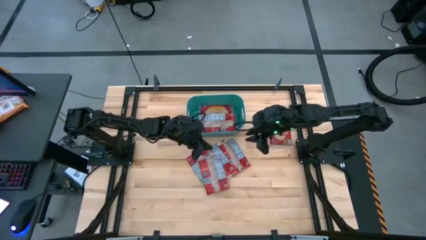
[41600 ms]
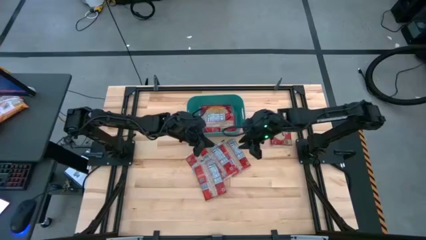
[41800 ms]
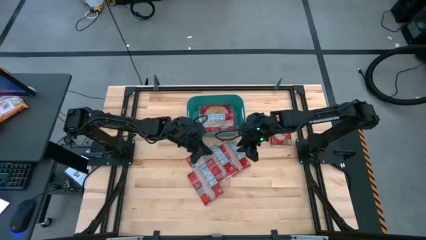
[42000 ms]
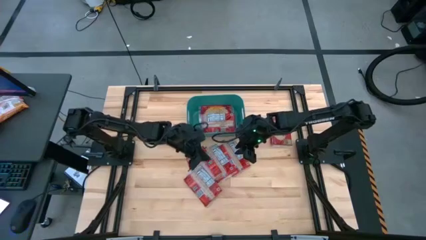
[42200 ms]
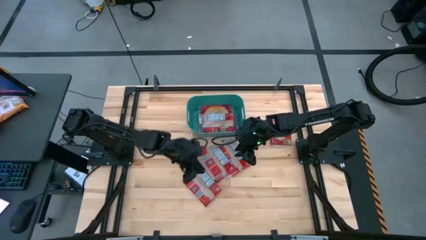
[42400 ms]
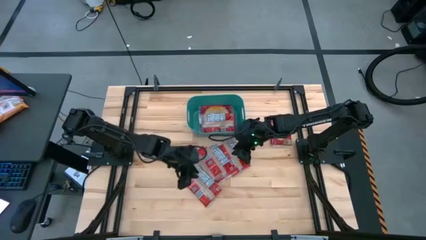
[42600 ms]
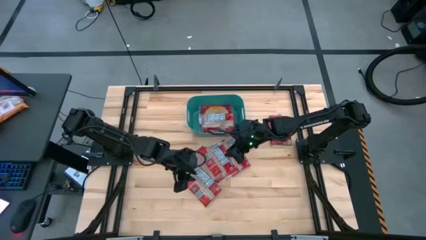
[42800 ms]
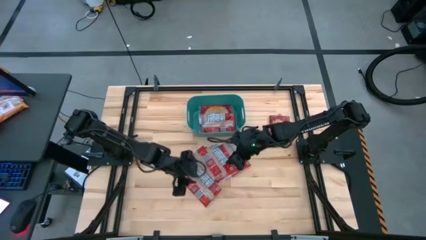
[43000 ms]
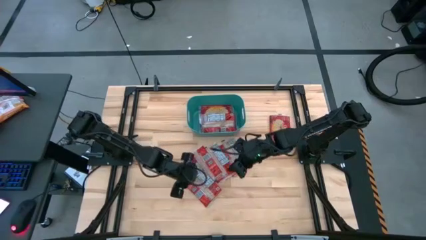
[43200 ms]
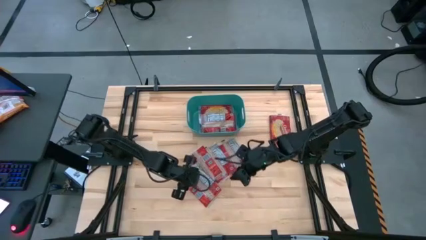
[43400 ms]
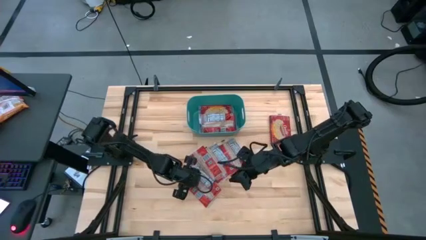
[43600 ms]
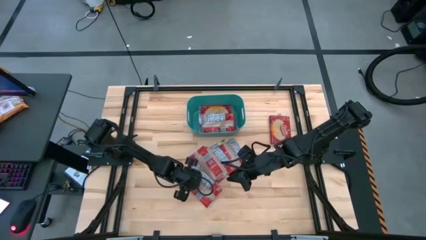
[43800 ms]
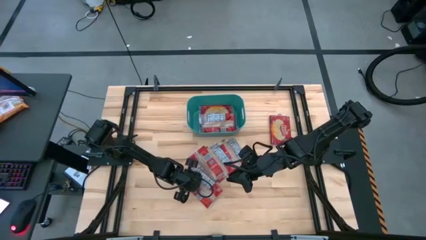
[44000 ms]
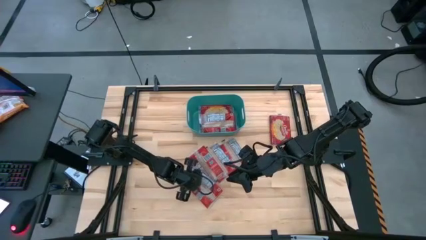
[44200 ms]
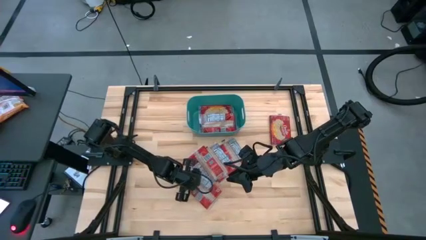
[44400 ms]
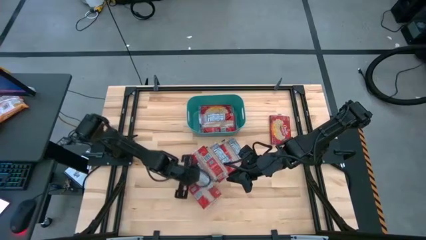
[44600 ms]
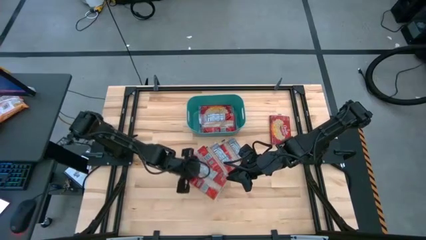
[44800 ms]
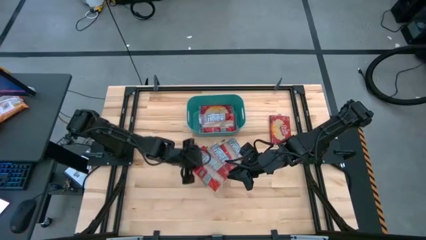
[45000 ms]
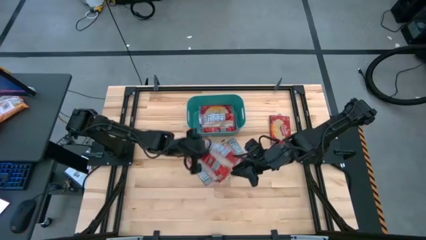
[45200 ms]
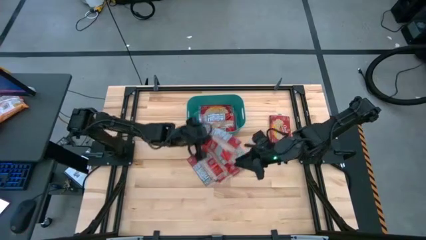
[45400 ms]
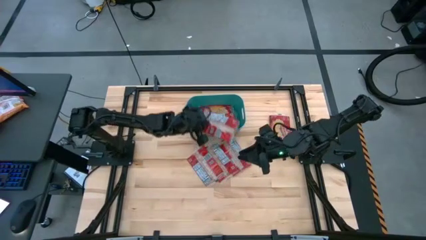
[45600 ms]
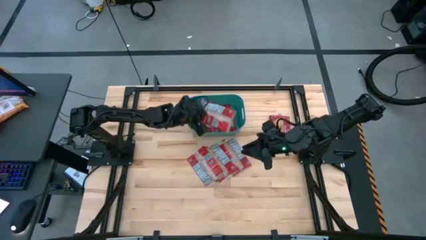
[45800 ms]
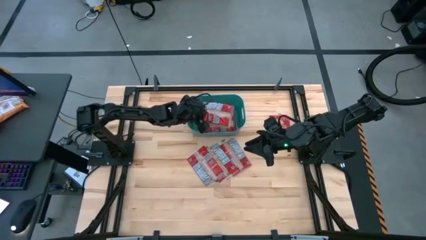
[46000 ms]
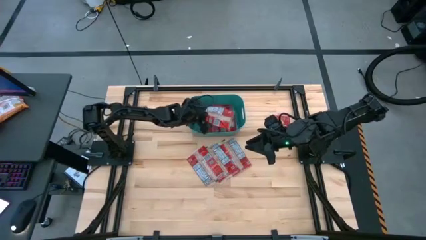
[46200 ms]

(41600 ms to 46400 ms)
Task: Sort popcorn bags into baskets
Put the red popcorn bag into the blue bin

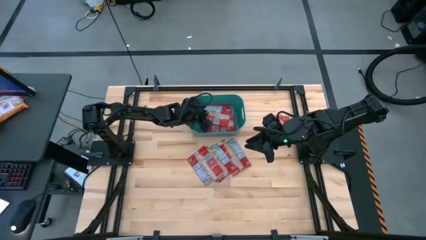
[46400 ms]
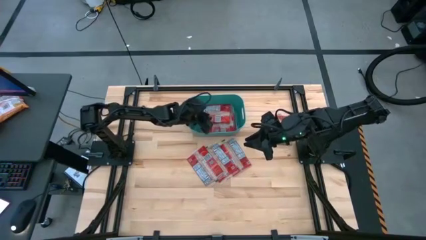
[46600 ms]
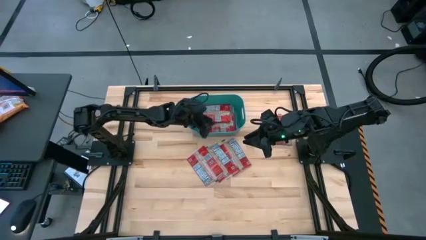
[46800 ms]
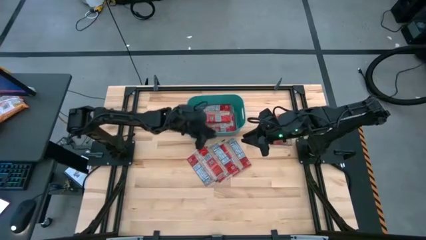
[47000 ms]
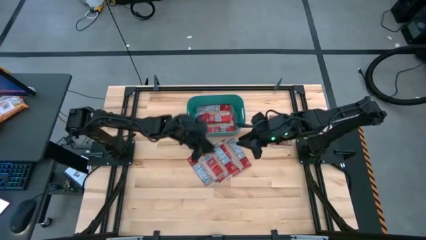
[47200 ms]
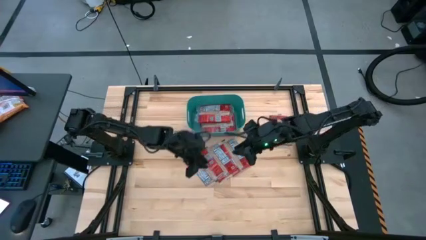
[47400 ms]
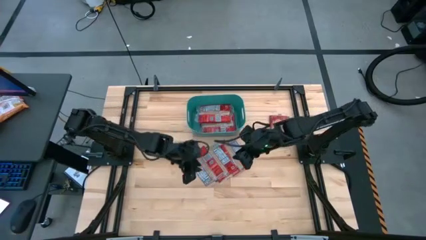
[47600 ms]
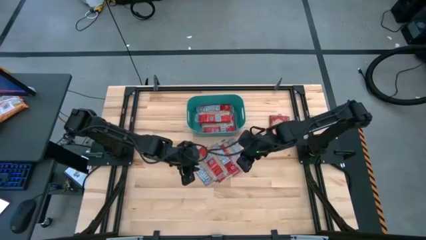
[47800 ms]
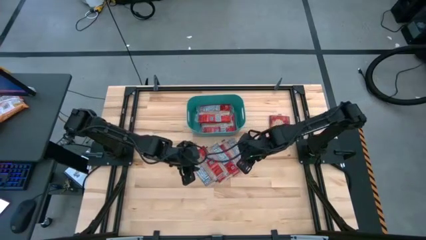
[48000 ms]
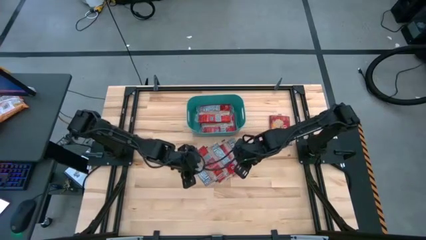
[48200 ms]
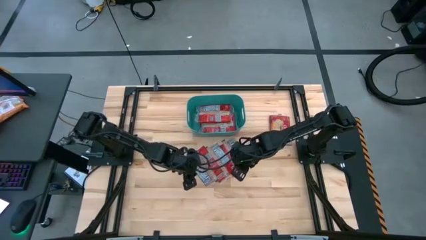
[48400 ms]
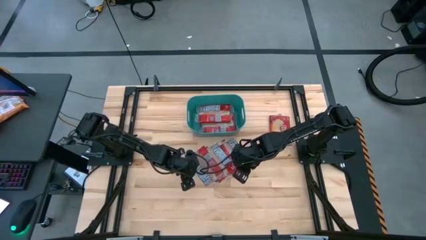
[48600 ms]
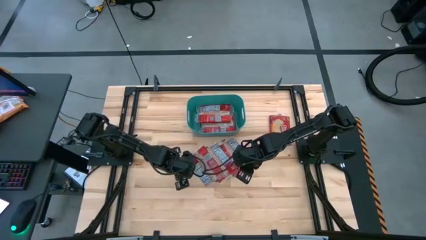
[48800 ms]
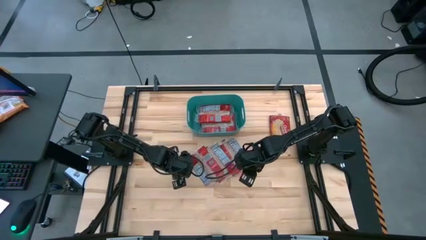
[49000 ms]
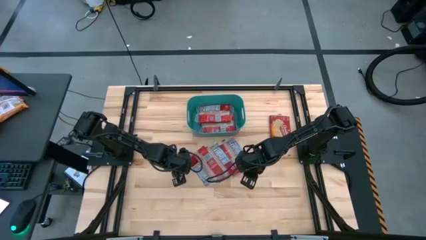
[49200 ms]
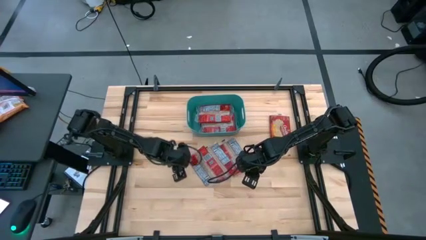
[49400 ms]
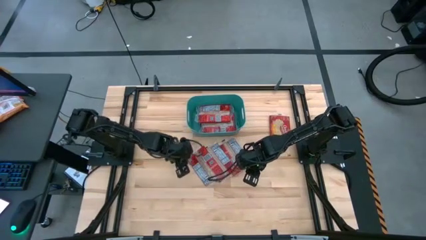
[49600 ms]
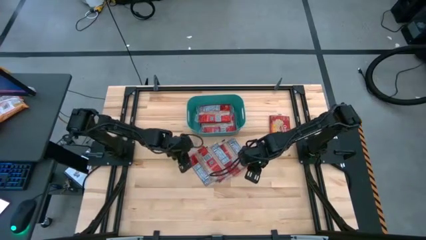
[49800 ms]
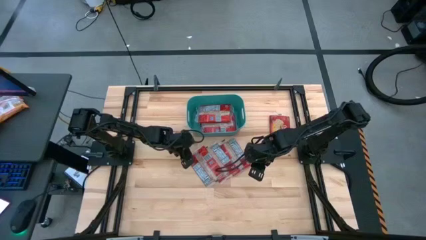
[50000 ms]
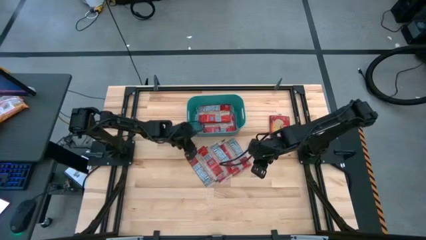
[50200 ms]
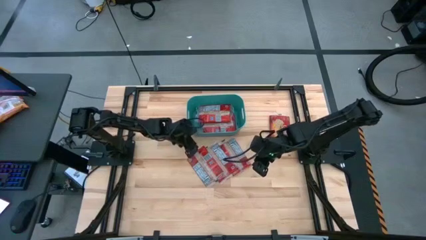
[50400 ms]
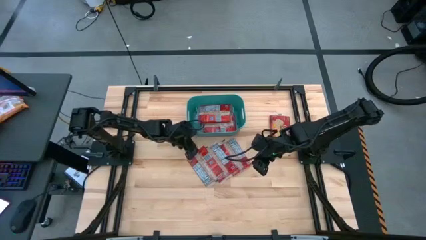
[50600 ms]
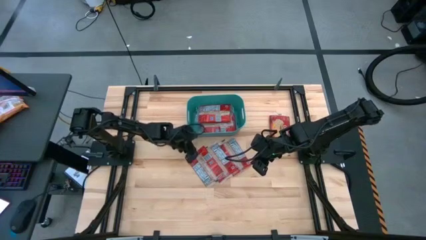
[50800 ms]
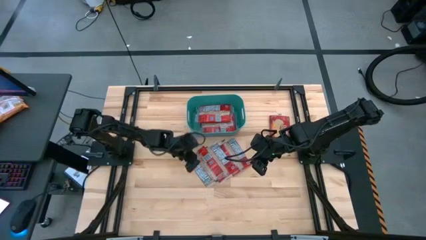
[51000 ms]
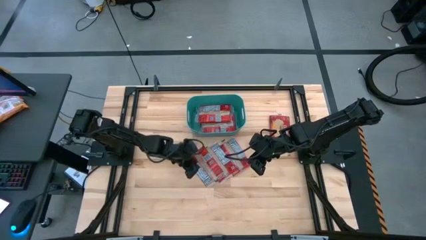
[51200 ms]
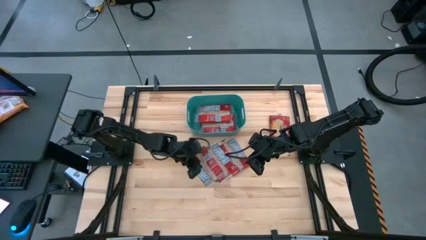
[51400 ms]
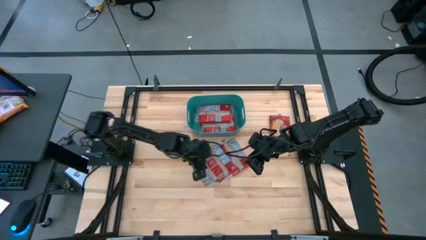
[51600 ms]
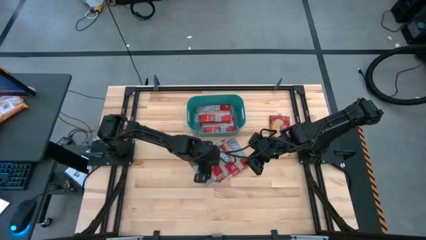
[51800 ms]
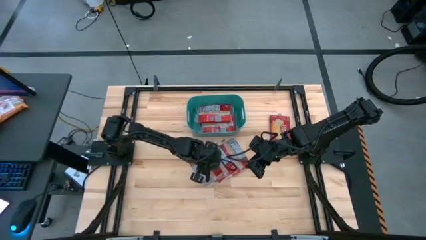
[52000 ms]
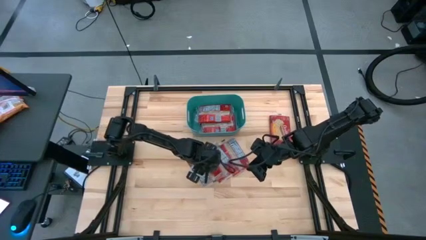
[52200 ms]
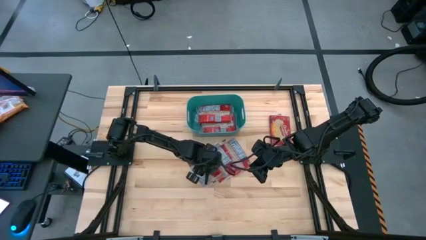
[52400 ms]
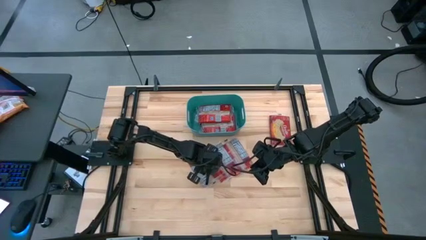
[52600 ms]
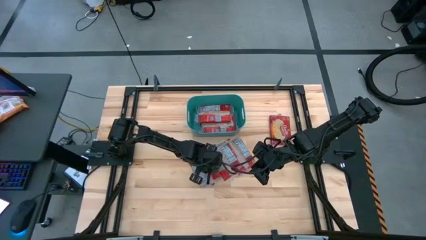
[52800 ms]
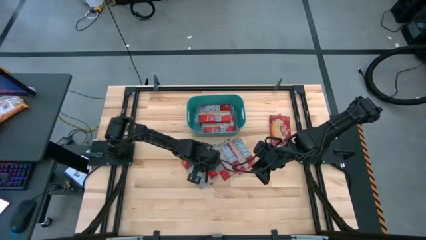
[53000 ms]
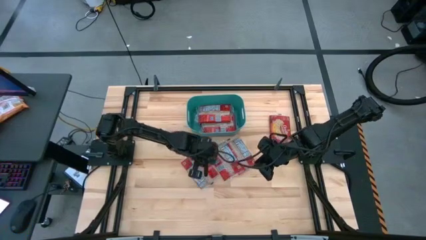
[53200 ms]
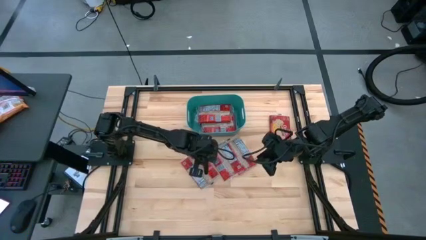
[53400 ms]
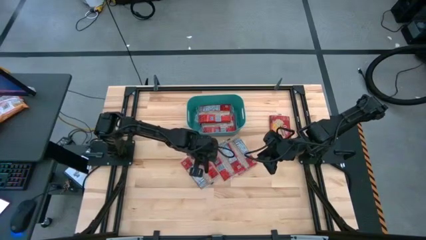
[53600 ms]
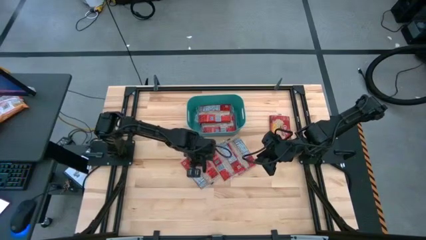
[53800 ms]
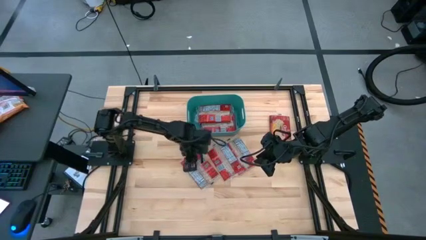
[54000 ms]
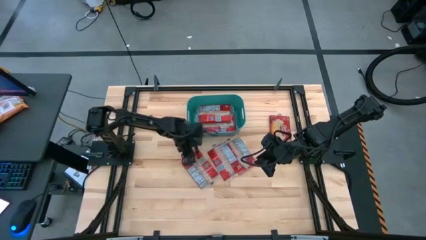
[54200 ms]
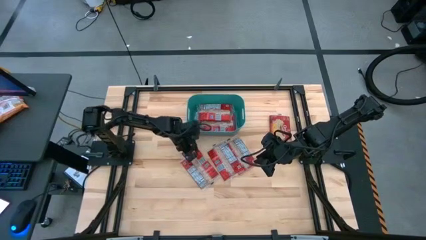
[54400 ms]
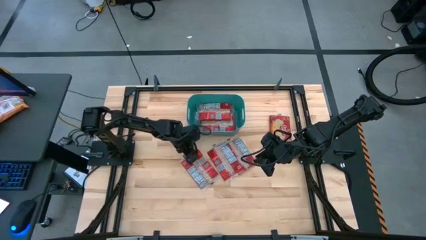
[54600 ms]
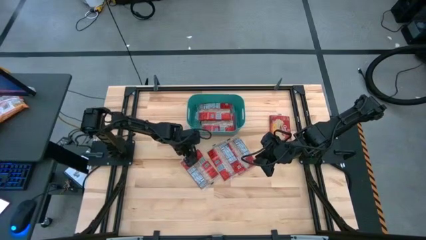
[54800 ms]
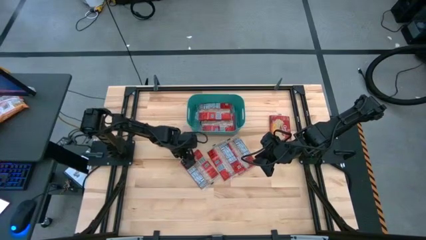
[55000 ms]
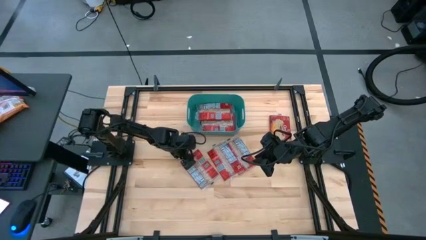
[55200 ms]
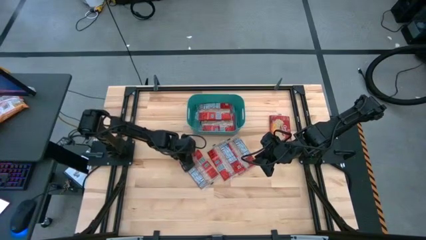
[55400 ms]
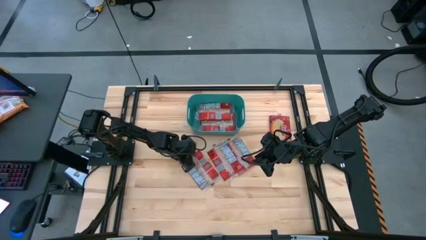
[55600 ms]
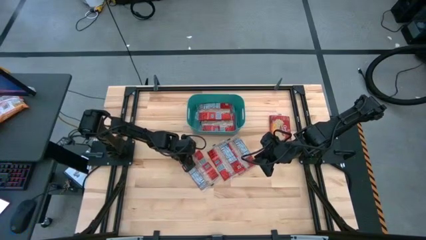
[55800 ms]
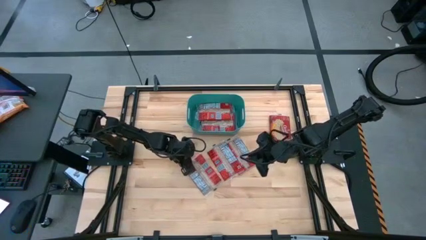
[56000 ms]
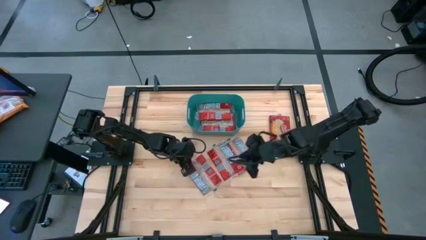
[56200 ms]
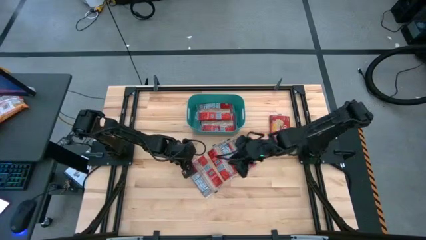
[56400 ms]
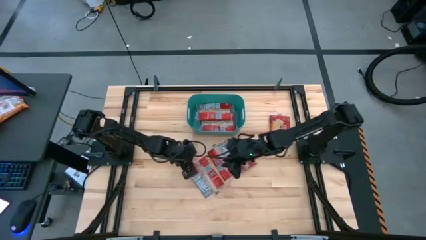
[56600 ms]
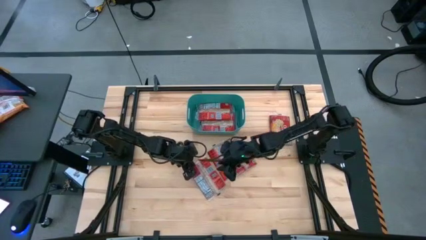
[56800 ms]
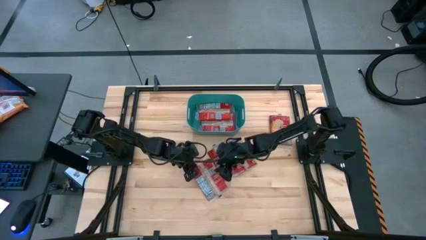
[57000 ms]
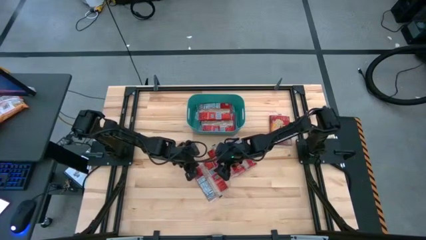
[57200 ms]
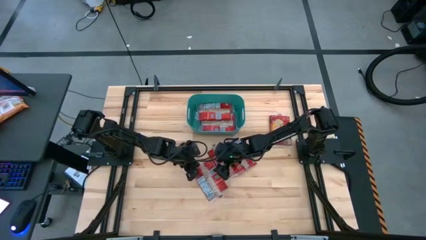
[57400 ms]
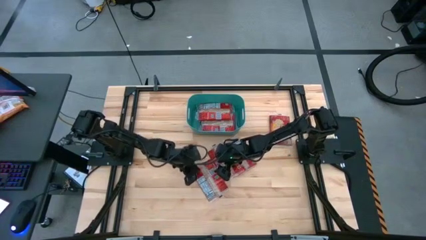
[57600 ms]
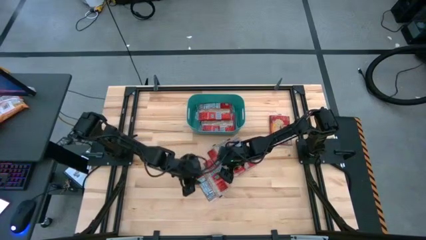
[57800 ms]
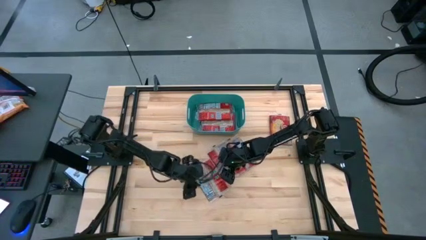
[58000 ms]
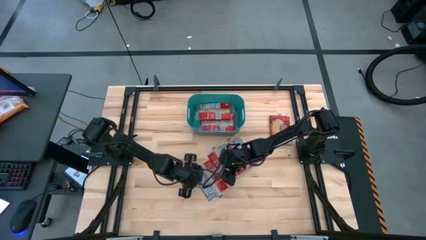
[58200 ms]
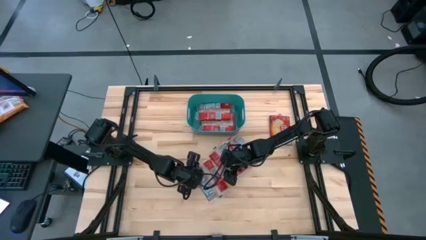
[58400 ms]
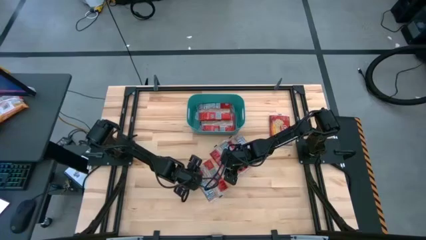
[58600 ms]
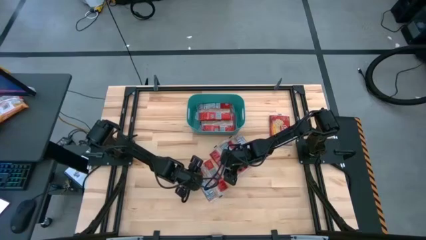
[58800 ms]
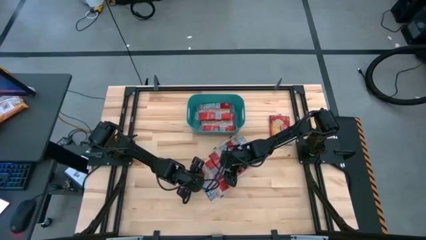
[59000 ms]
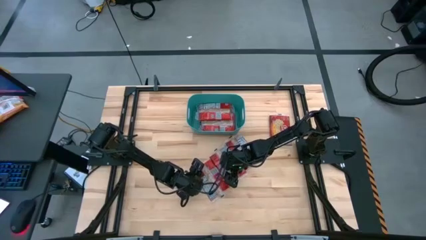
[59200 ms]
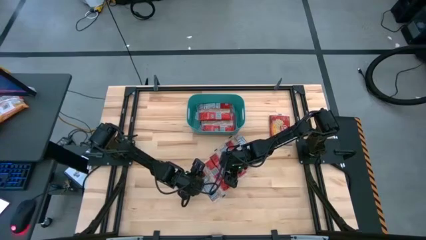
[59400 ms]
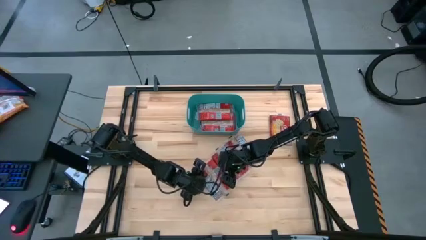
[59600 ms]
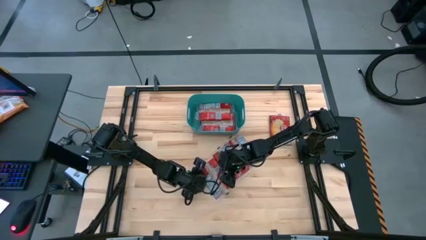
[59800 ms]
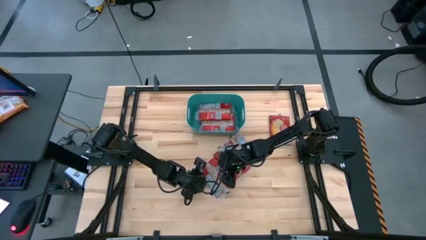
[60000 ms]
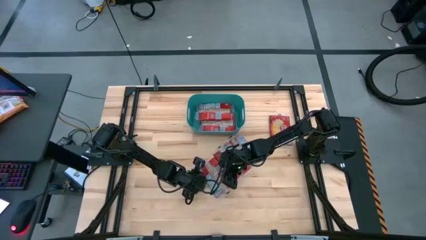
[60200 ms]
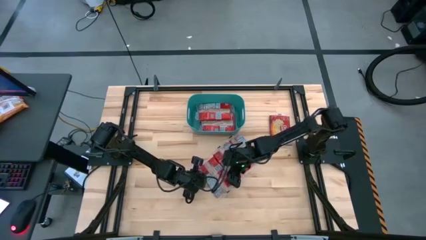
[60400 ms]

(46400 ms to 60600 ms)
Put the red popcorn bag into the blue bin
